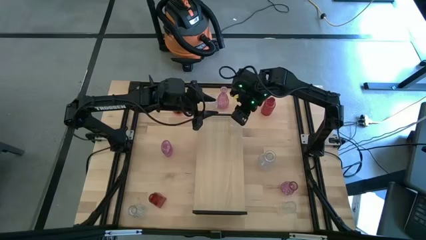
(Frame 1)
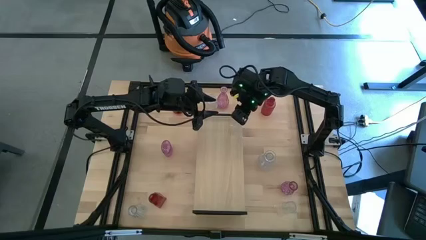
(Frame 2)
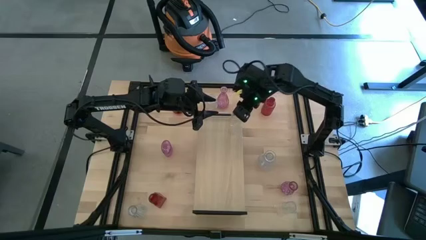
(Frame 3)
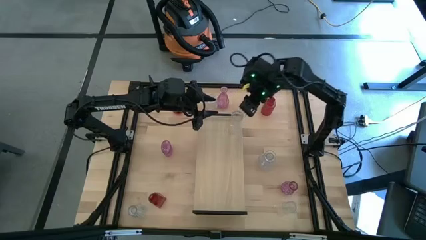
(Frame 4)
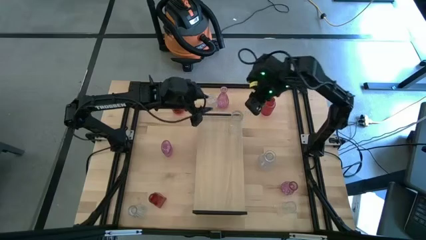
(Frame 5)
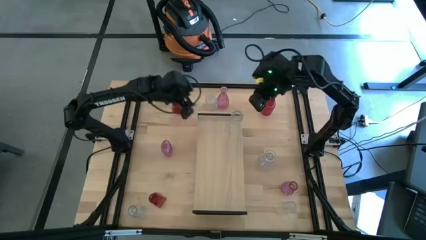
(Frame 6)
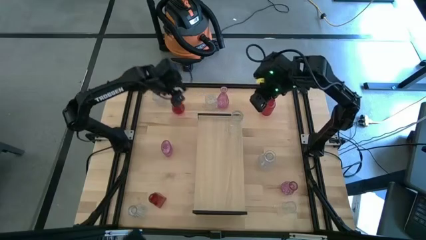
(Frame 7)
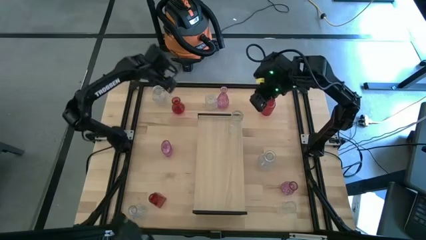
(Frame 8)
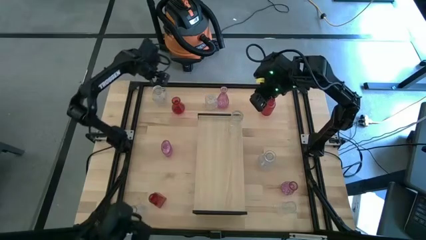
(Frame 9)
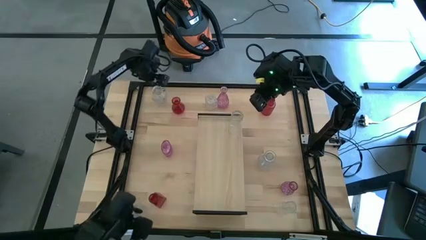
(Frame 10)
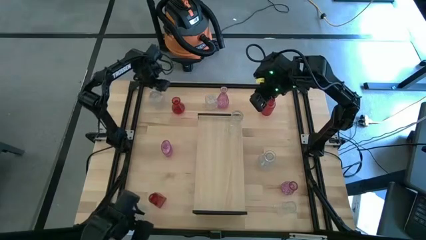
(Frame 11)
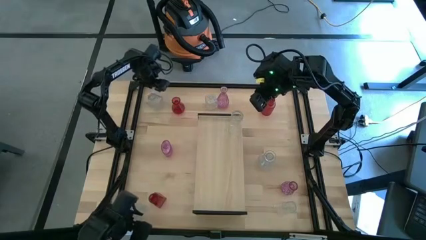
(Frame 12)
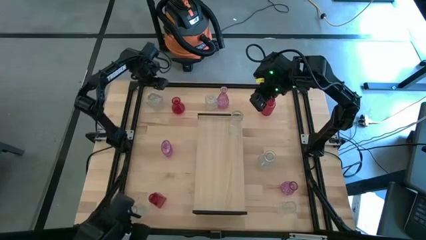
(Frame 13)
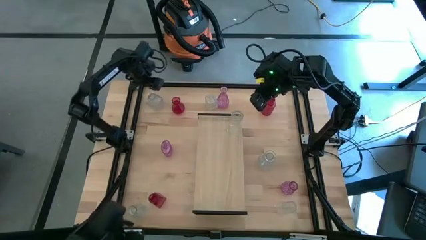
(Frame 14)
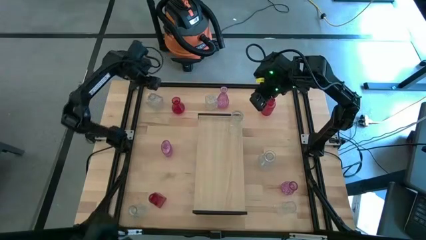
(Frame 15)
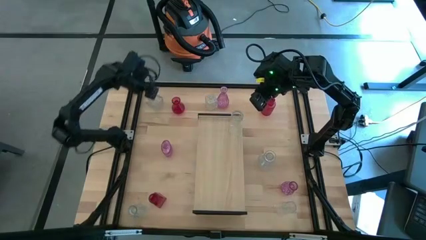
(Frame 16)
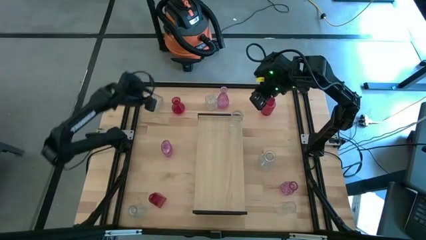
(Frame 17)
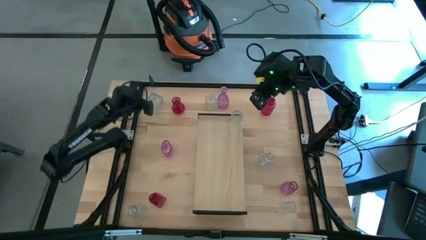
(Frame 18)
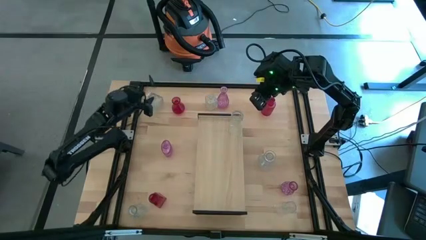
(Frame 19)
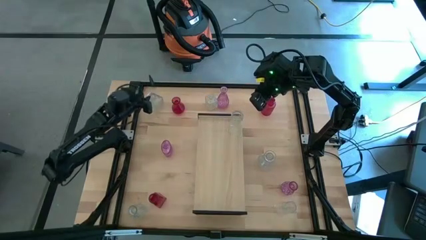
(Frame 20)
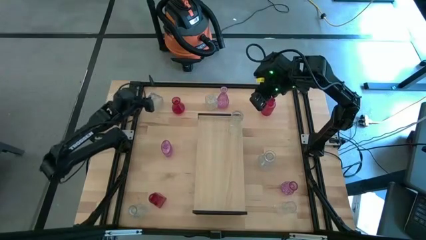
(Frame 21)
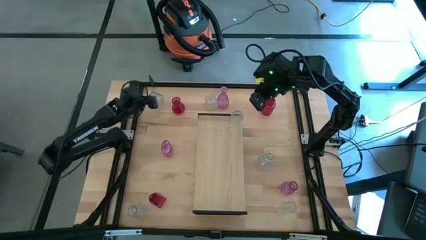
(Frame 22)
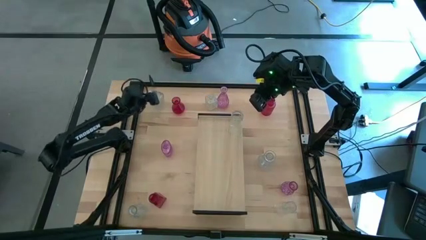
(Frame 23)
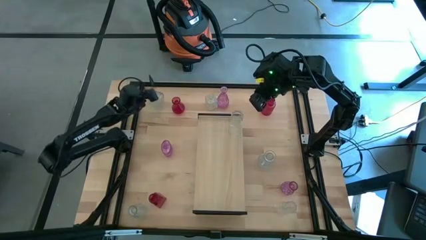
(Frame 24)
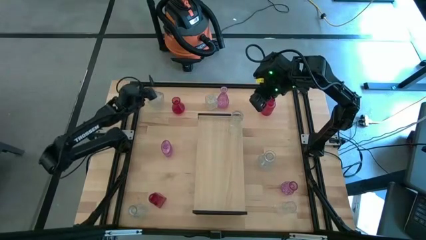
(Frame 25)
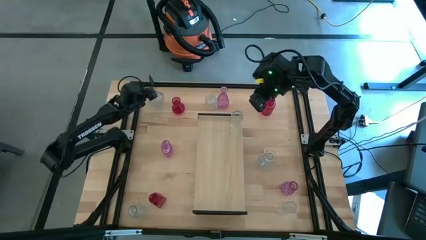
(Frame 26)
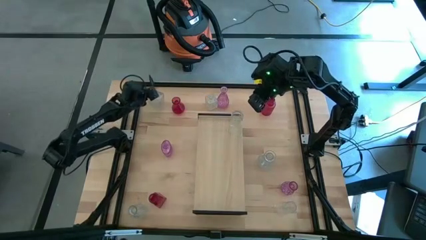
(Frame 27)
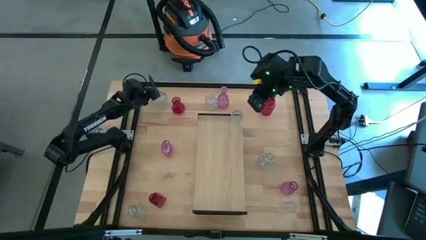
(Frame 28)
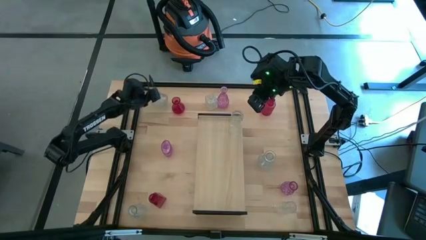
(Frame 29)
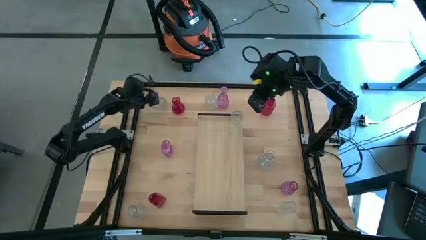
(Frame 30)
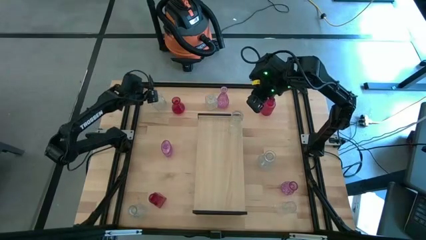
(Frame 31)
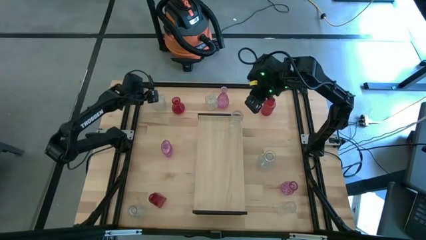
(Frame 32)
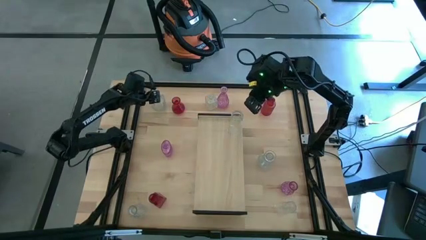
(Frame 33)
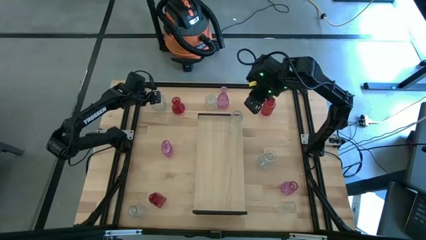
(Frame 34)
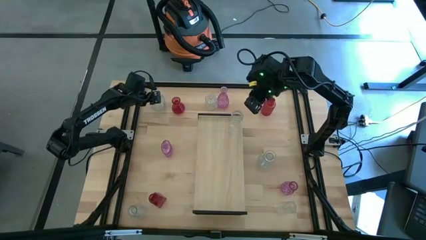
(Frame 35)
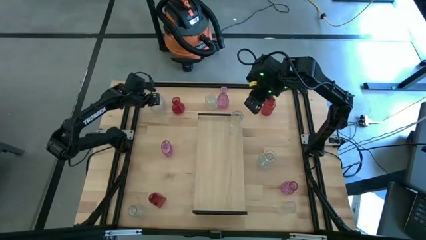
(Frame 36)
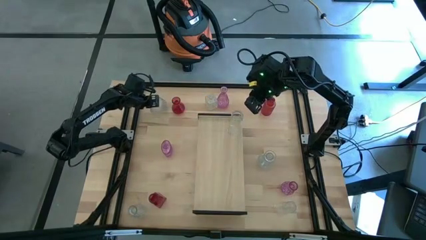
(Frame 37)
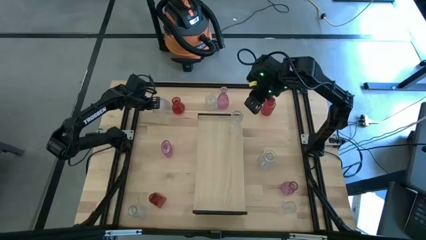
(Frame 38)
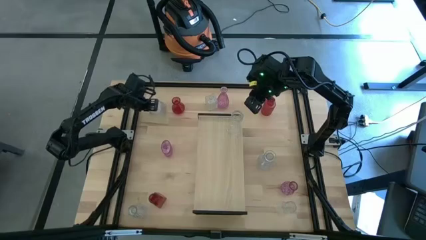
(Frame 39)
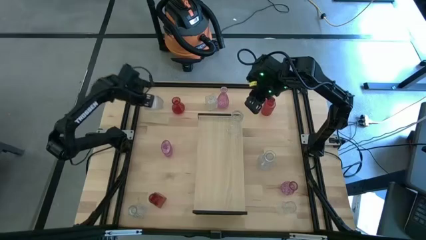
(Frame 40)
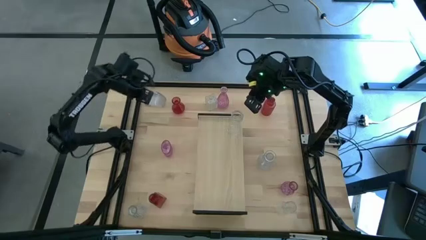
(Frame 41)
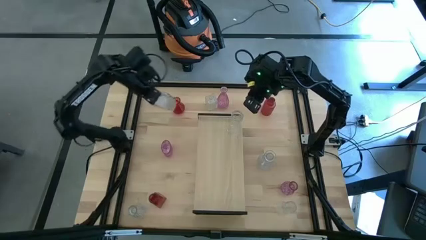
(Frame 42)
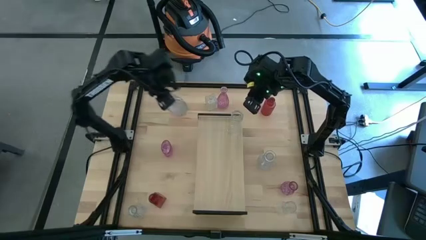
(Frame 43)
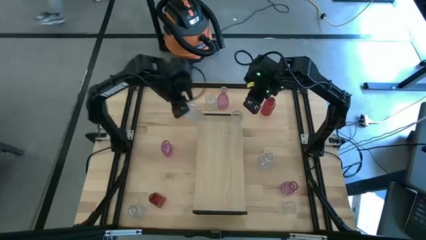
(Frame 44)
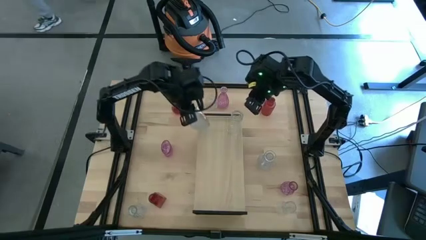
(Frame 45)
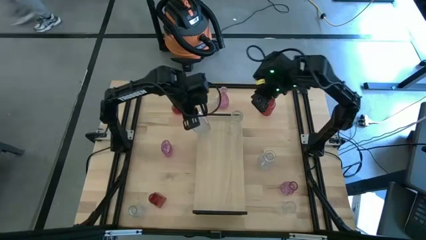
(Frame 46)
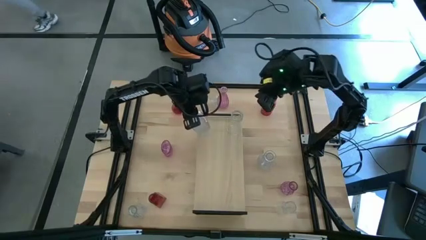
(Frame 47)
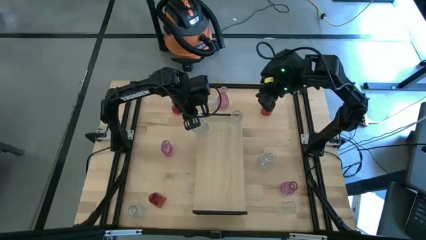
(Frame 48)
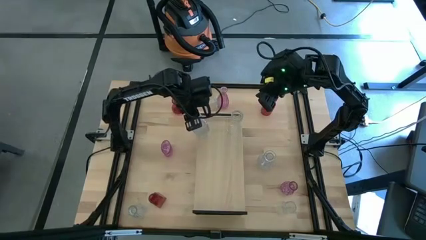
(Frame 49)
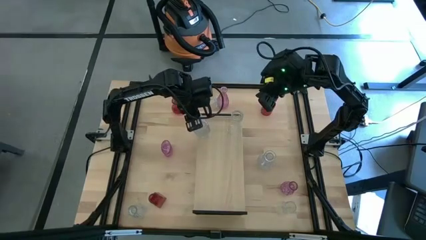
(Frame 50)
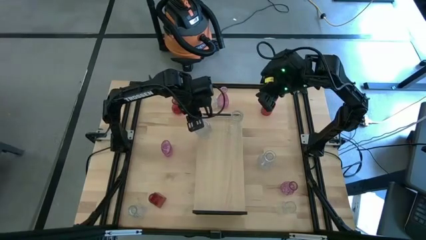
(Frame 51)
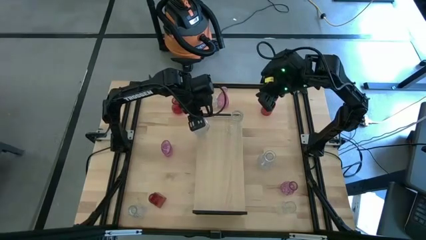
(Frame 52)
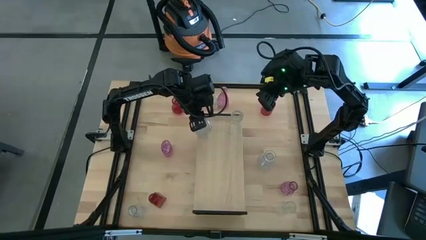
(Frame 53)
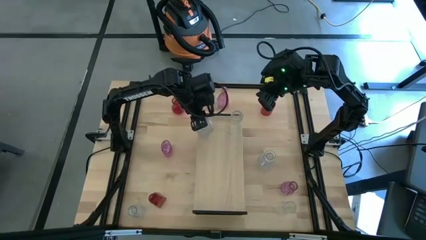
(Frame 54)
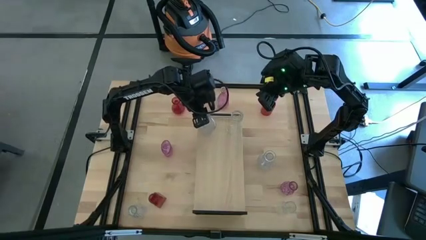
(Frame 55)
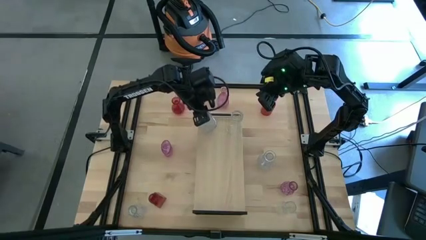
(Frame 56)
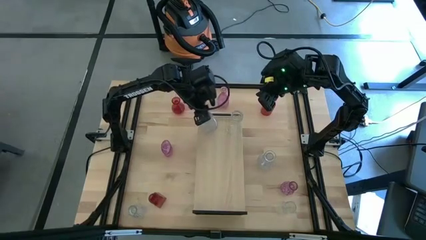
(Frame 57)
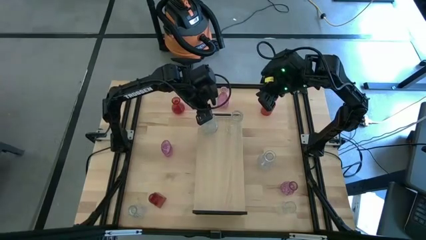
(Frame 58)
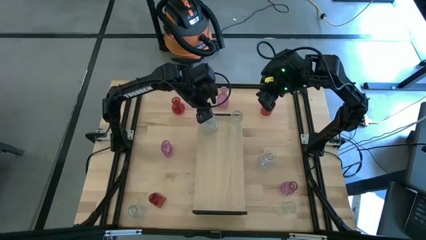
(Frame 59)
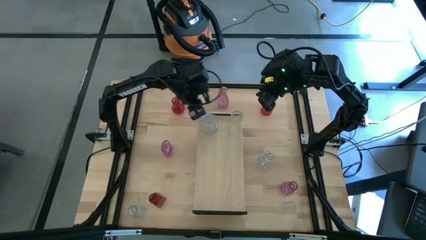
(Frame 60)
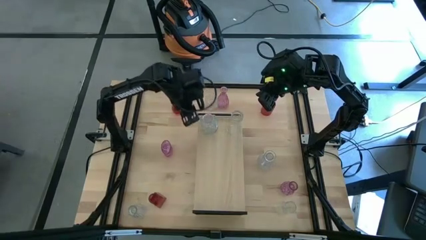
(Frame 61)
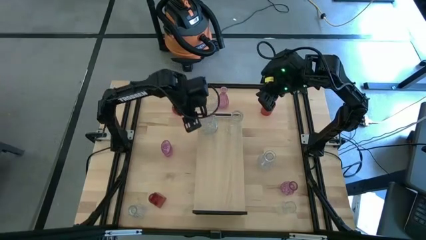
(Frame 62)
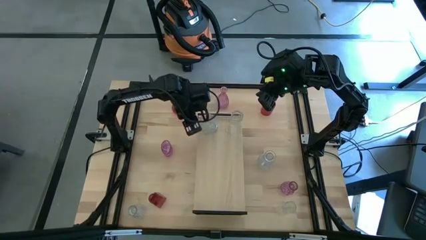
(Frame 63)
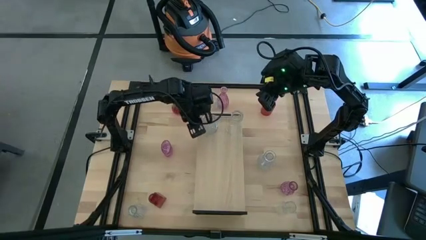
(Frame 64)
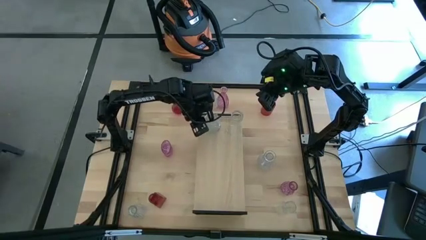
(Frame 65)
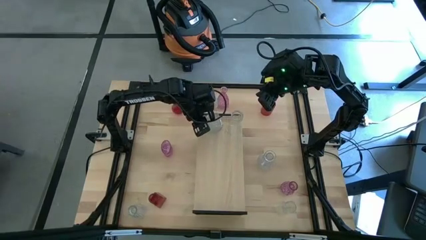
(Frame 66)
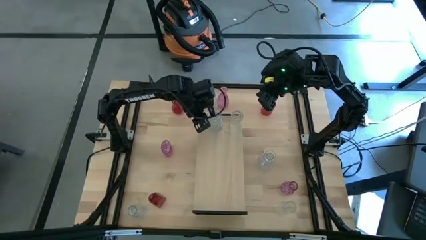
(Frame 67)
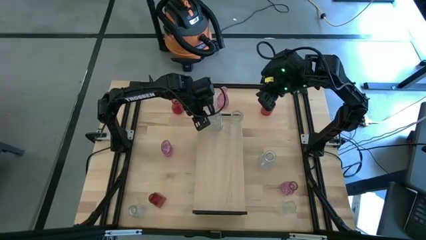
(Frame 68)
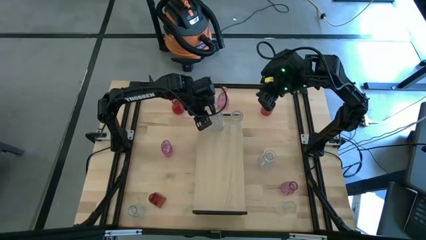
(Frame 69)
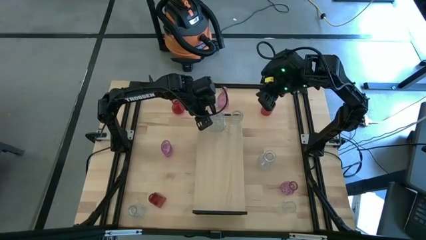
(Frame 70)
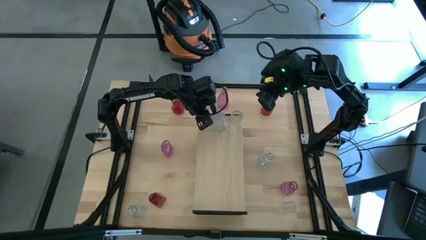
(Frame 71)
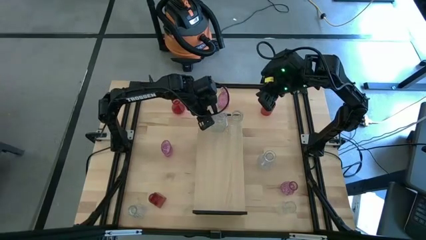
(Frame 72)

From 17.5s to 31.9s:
Task: sort vases onto shelf
Put the transparent vase on the shelf aligned with the transparent vase on the top
